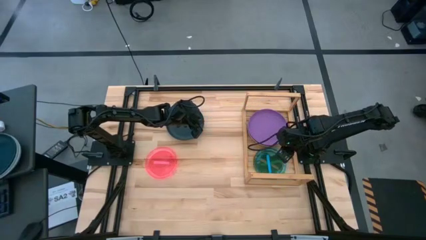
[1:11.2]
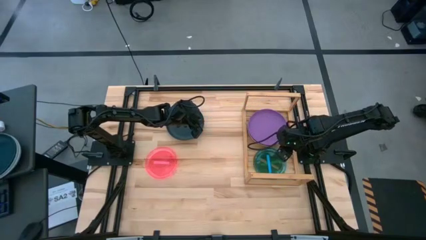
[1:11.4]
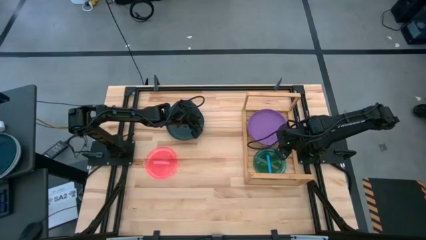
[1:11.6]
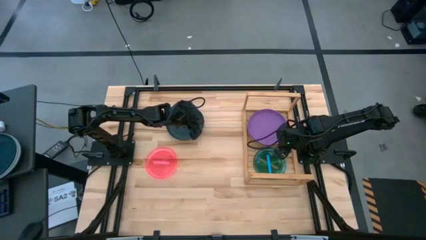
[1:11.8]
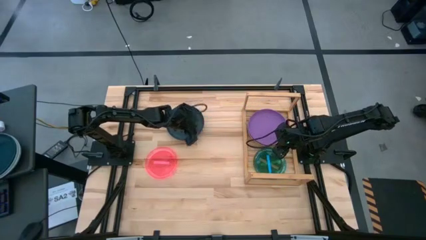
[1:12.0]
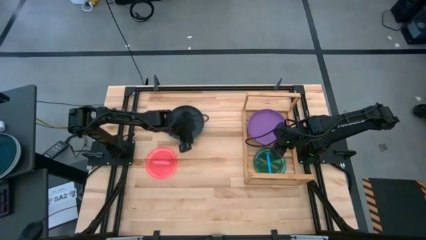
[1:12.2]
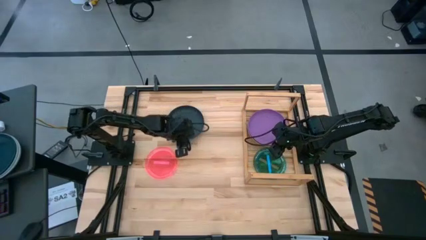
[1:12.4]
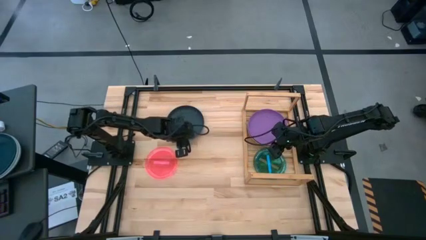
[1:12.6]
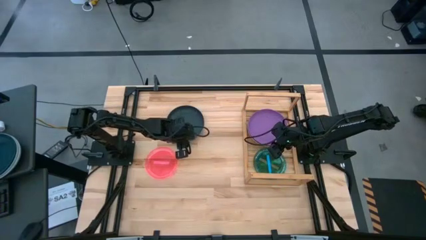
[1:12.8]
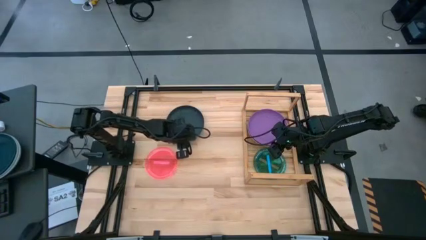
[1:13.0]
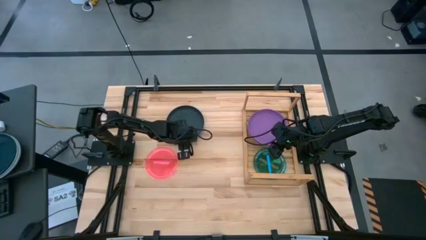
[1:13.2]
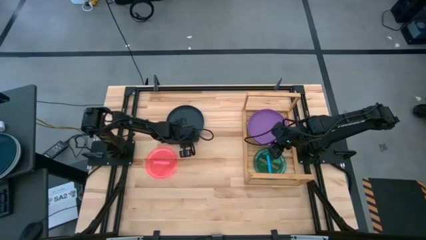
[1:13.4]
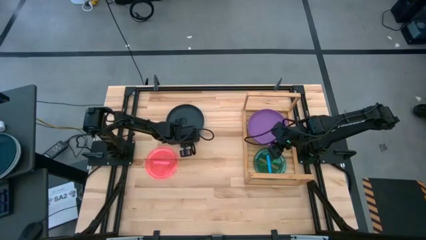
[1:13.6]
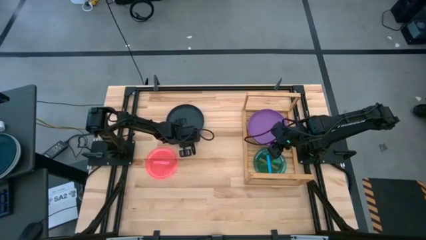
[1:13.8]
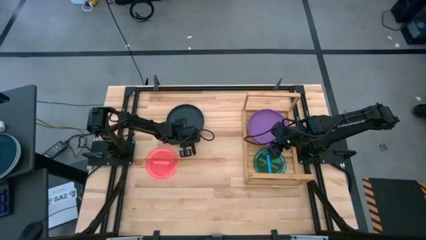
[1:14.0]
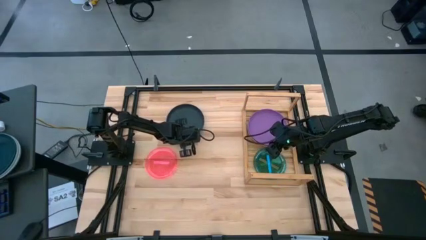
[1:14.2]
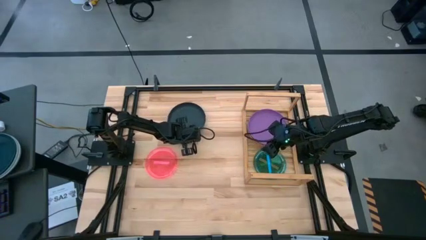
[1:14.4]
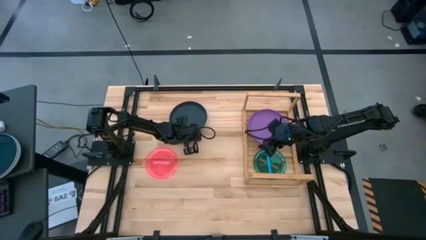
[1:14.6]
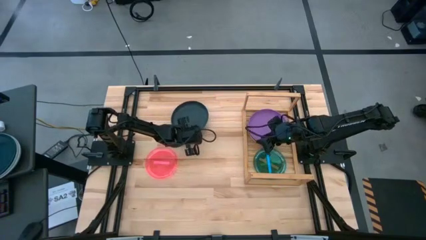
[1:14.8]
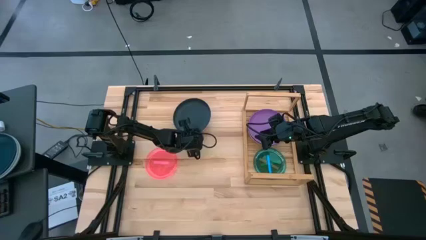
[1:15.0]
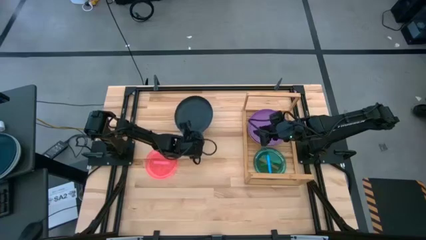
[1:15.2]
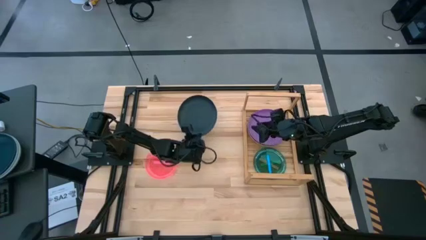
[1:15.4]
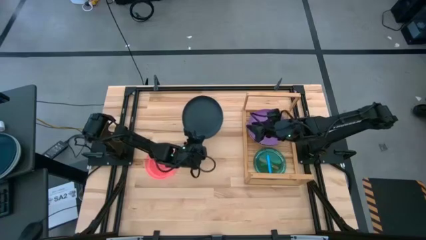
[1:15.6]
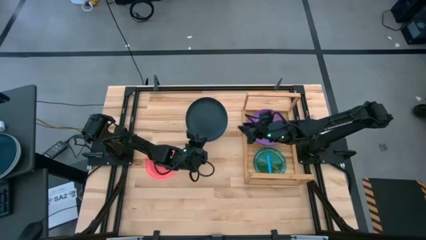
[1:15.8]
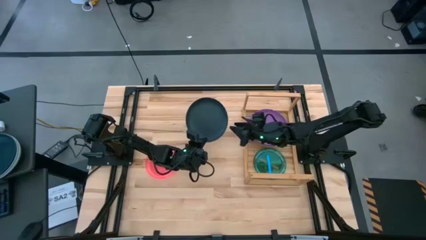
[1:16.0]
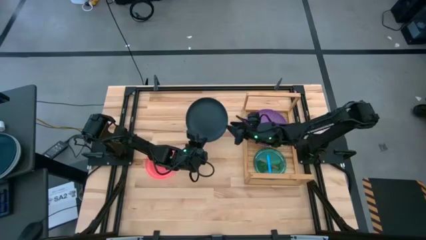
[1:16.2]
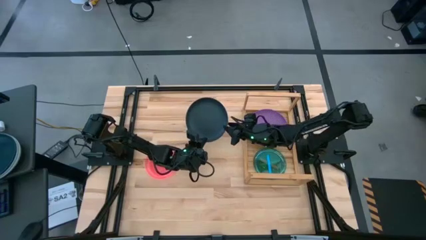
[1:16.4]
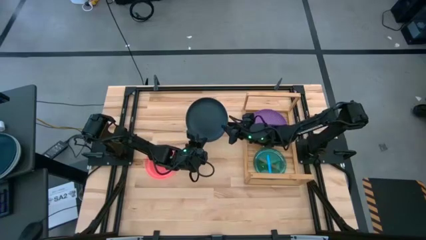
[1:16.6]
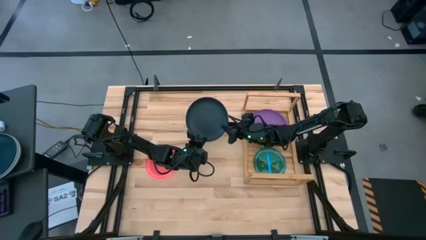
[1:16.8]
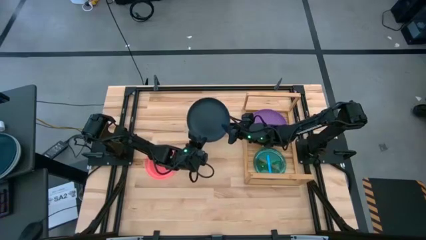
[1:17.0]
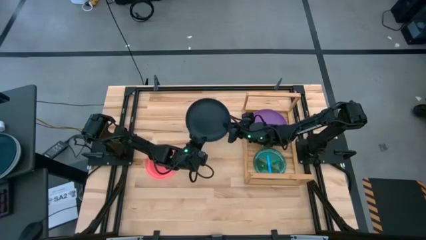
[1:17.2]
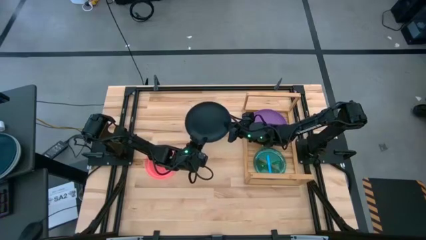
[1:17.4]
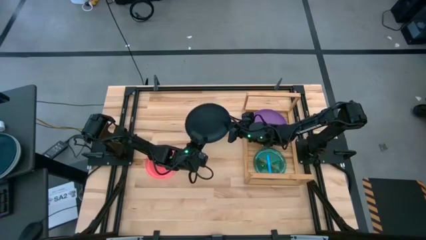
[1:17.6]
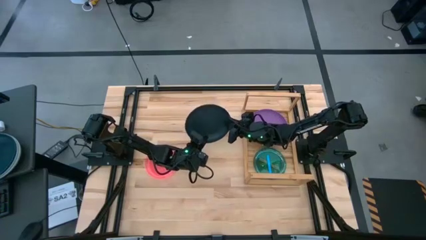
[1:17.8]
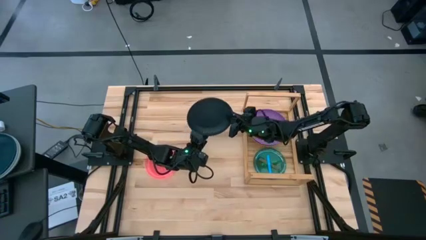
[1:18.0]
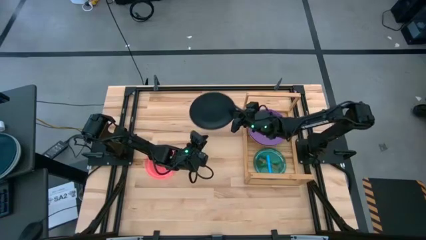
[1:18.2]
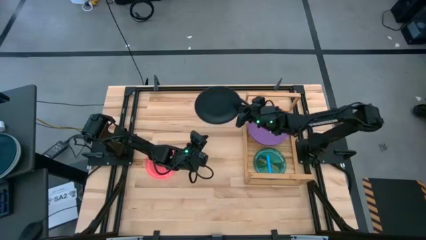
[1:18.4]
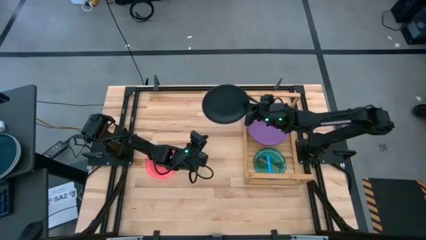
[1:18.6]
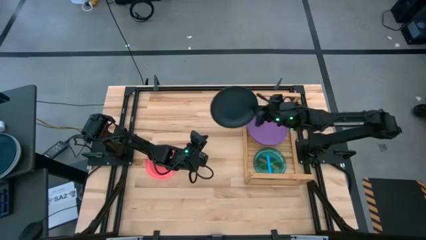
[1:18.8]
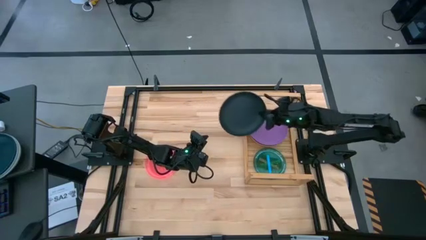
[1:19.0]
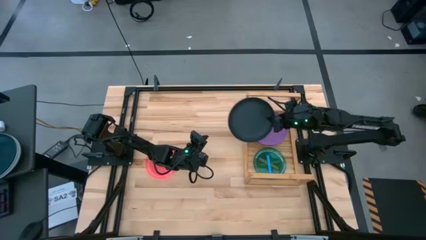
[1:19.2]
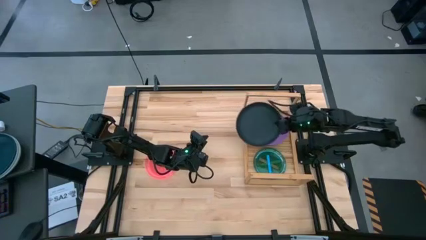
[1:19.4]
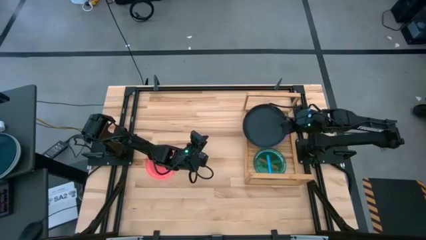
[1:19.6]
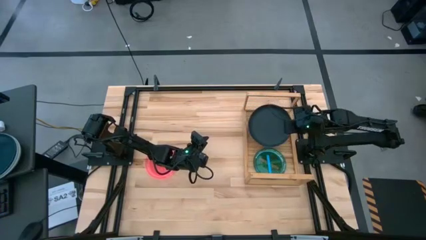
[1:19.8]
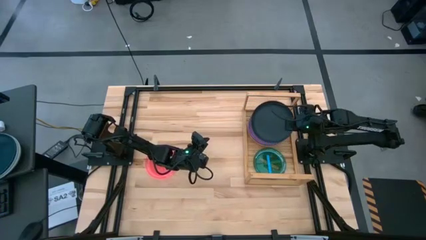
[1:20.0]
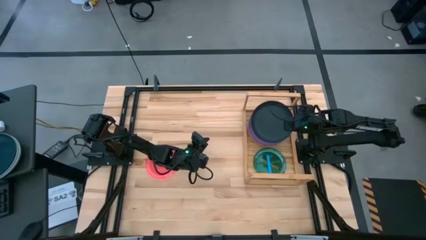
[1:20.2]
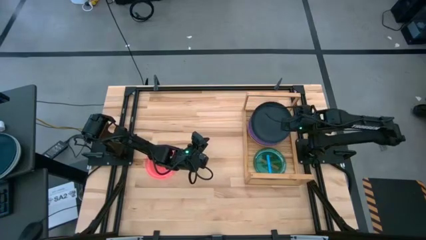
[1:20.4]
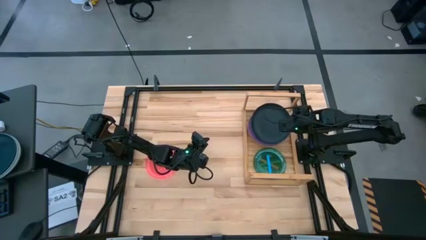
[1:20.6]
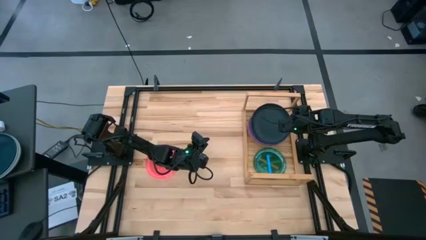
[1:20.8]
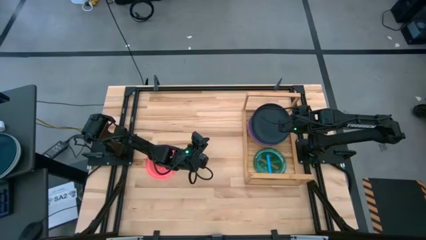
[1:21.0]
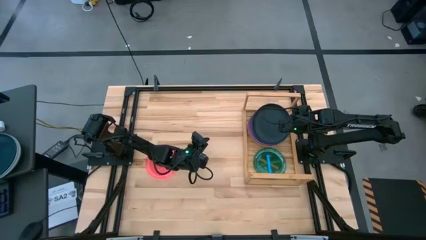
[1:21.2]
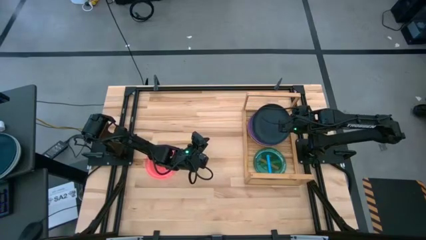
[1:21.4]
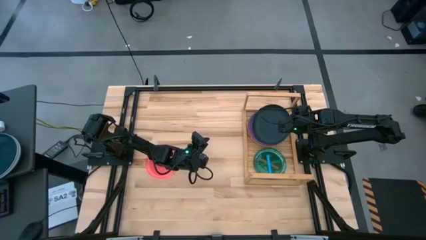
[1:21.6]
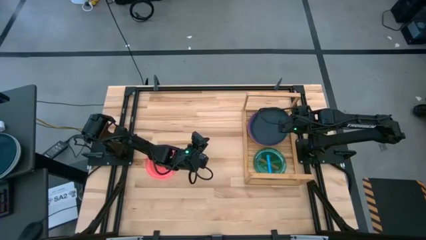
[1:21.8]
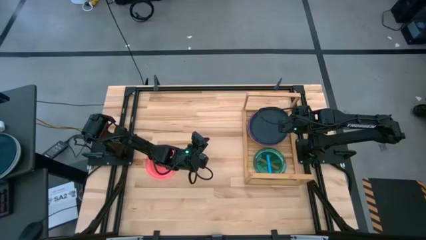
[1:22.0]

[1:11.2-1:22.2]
Task: Place and stack plates onto a shelf
Stack the black plate on top of the purple plate on the shelf
